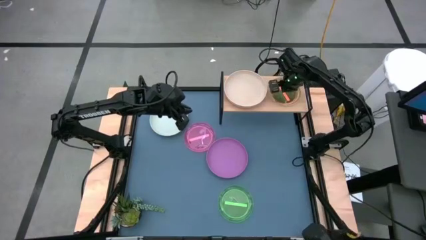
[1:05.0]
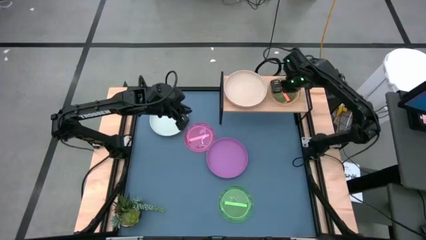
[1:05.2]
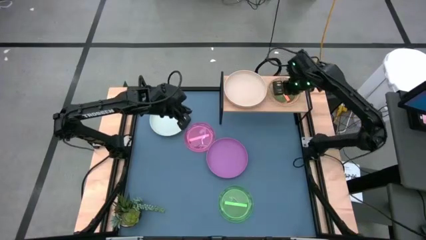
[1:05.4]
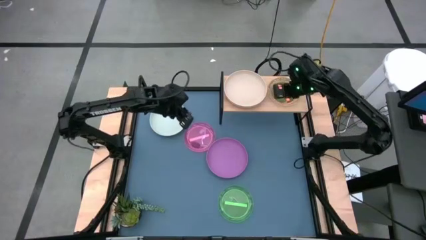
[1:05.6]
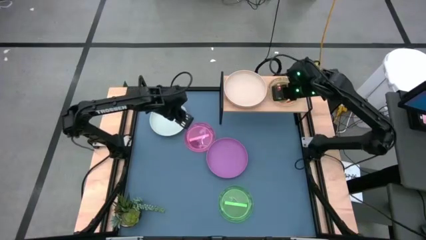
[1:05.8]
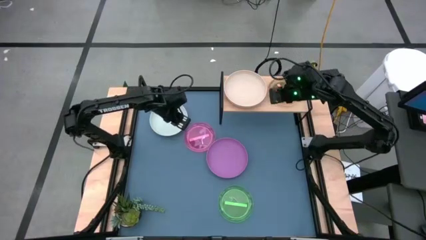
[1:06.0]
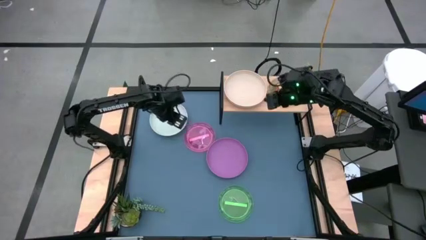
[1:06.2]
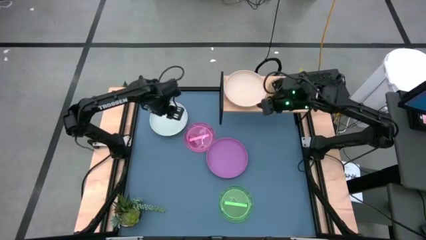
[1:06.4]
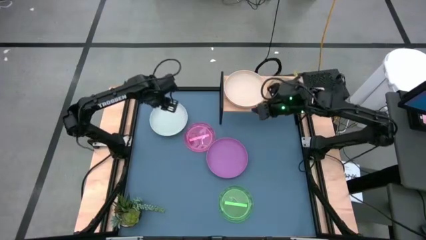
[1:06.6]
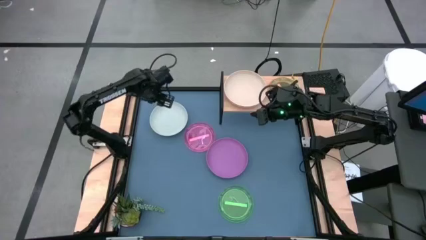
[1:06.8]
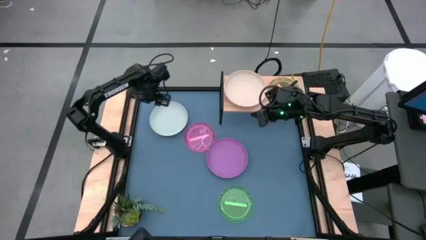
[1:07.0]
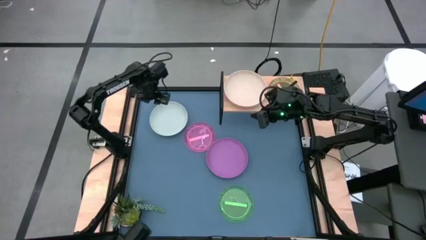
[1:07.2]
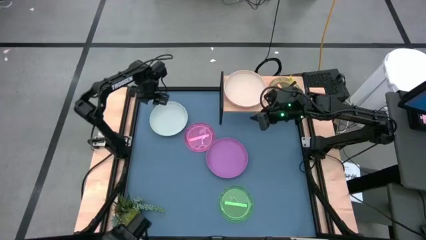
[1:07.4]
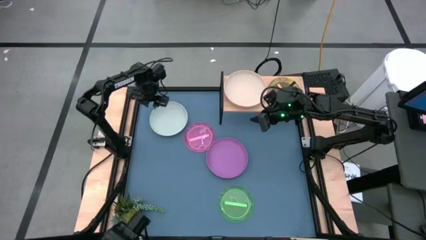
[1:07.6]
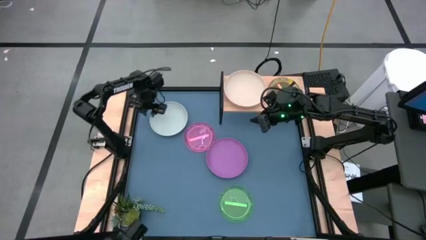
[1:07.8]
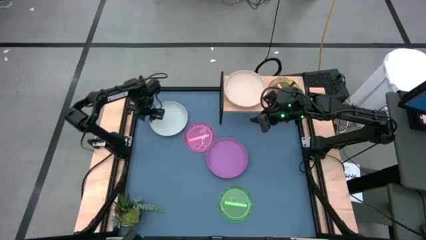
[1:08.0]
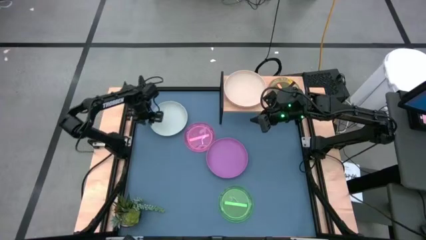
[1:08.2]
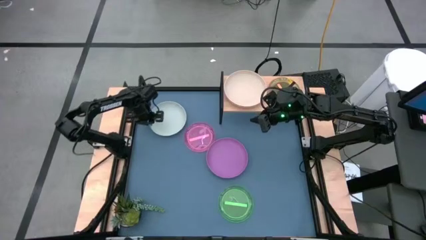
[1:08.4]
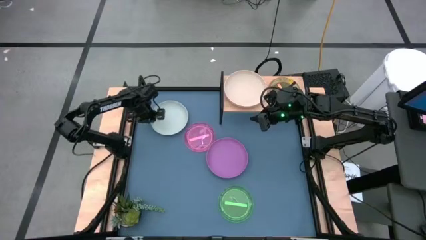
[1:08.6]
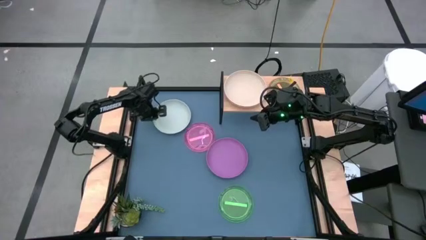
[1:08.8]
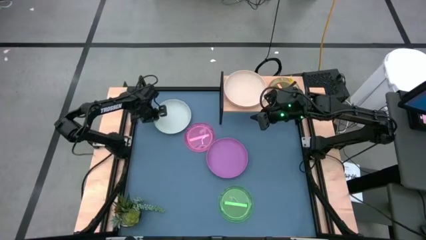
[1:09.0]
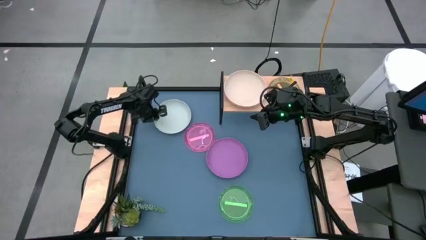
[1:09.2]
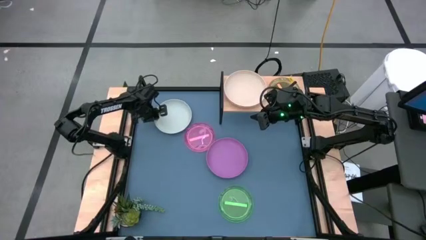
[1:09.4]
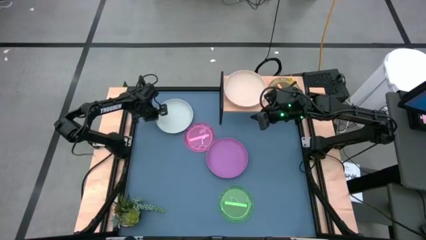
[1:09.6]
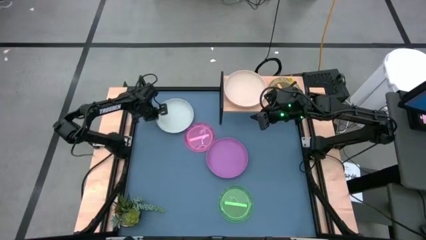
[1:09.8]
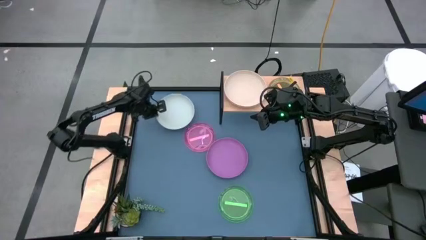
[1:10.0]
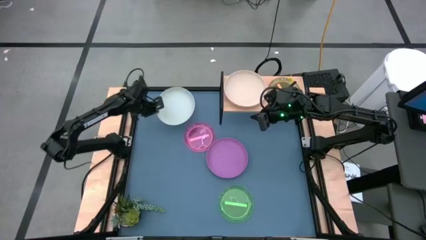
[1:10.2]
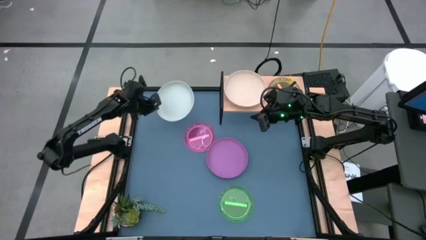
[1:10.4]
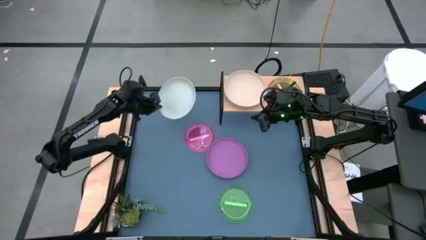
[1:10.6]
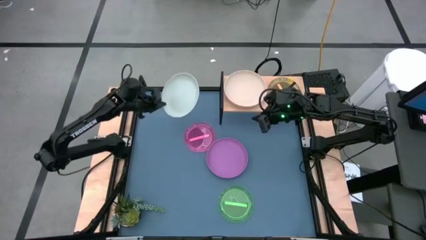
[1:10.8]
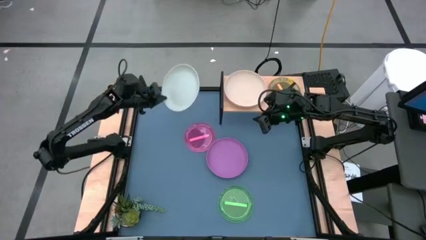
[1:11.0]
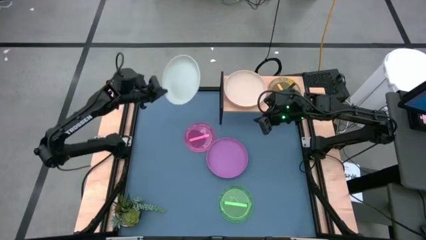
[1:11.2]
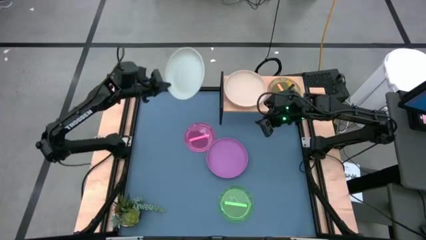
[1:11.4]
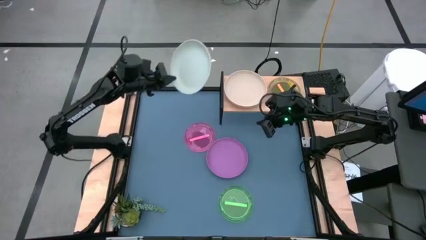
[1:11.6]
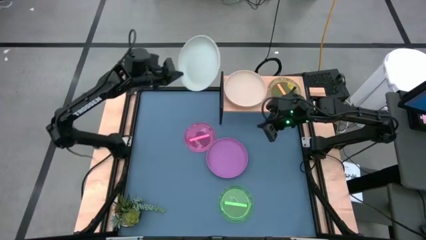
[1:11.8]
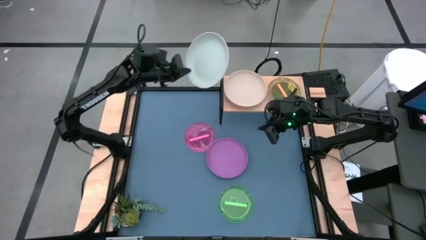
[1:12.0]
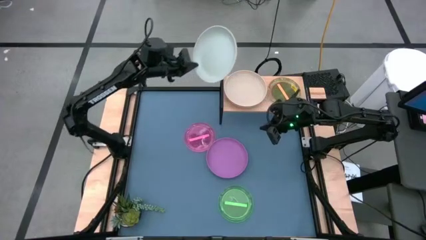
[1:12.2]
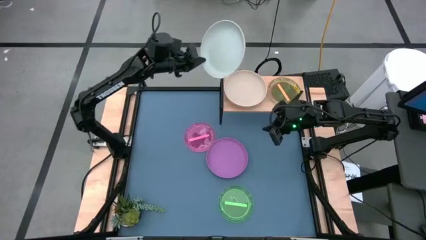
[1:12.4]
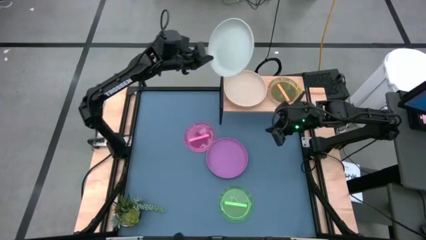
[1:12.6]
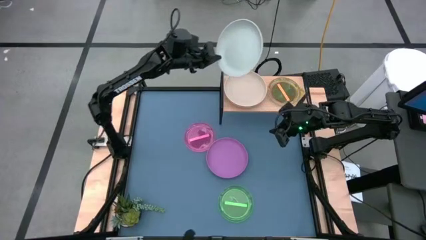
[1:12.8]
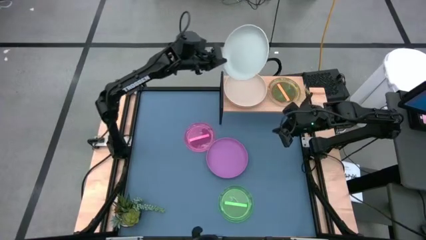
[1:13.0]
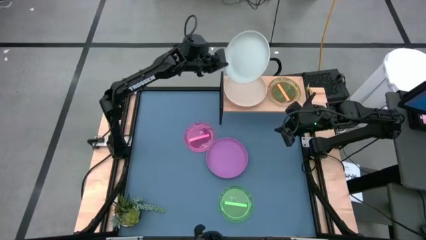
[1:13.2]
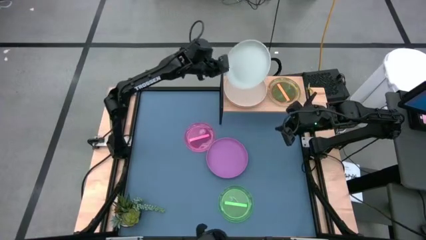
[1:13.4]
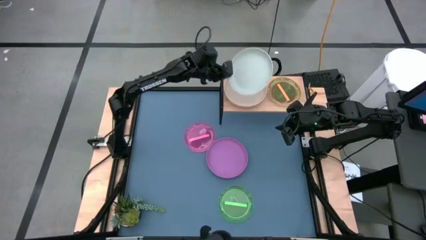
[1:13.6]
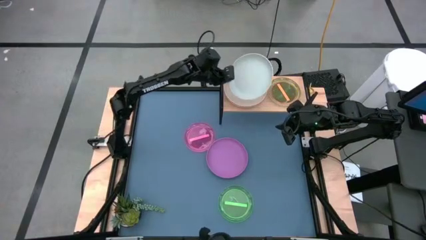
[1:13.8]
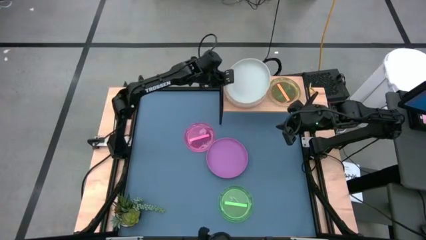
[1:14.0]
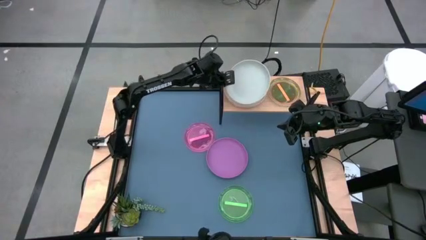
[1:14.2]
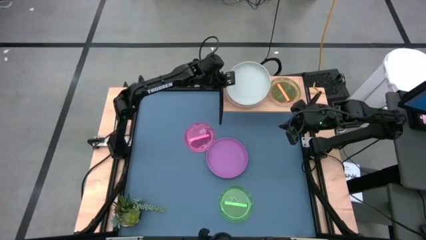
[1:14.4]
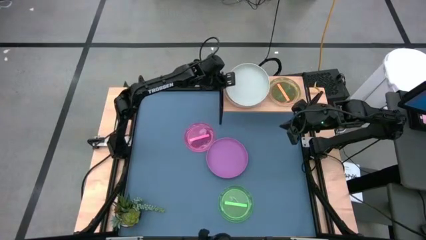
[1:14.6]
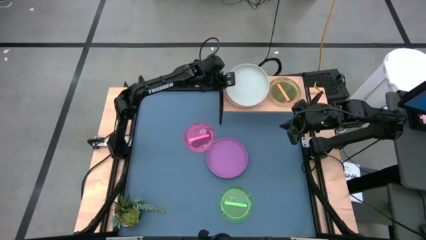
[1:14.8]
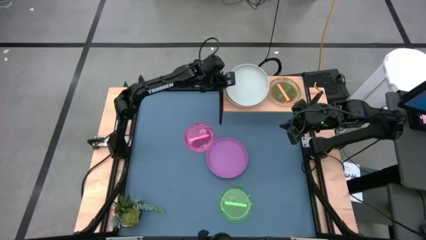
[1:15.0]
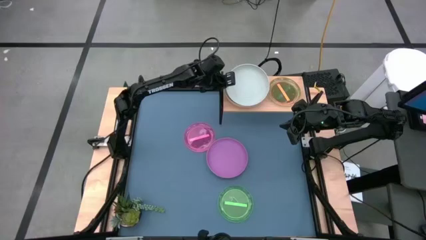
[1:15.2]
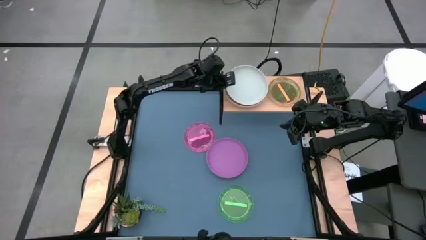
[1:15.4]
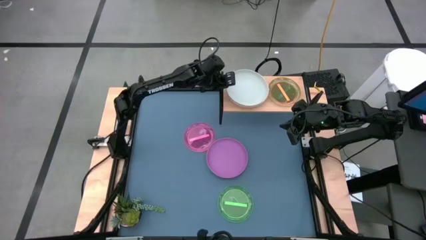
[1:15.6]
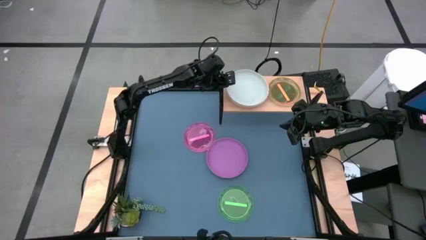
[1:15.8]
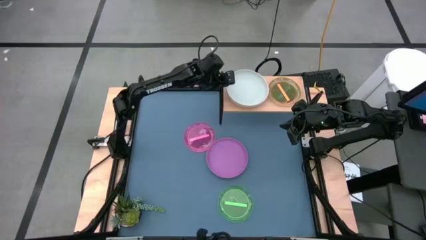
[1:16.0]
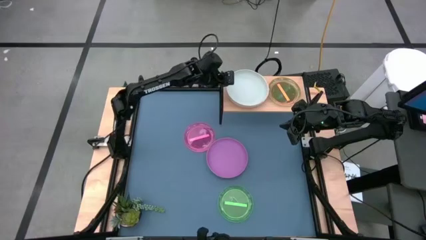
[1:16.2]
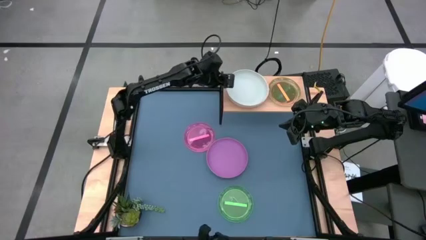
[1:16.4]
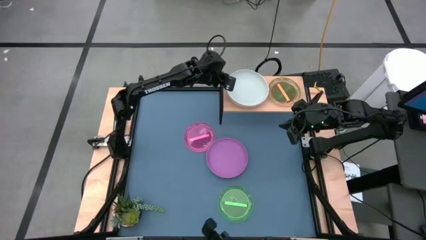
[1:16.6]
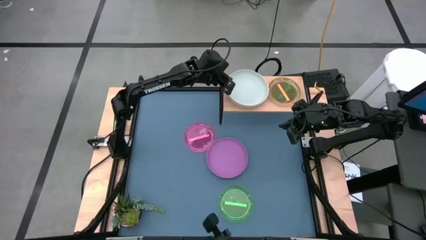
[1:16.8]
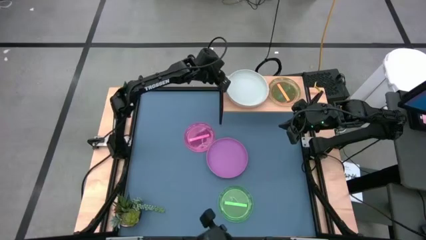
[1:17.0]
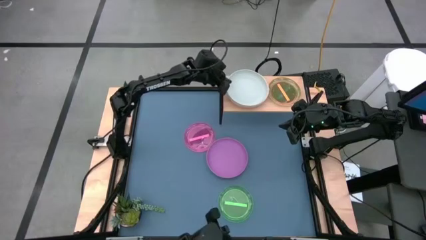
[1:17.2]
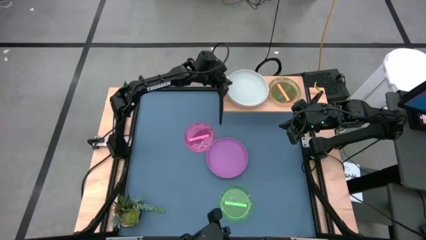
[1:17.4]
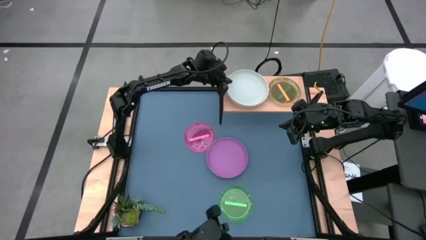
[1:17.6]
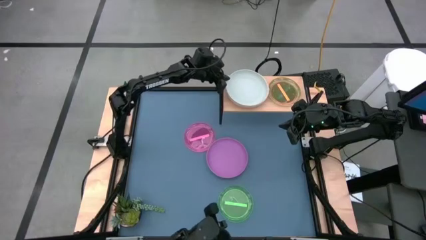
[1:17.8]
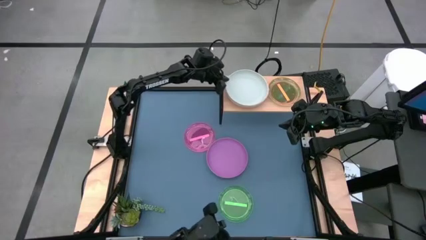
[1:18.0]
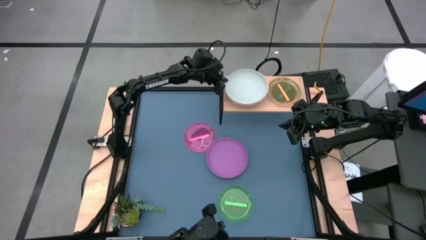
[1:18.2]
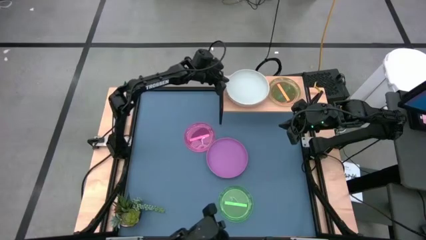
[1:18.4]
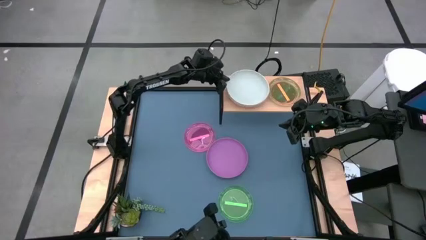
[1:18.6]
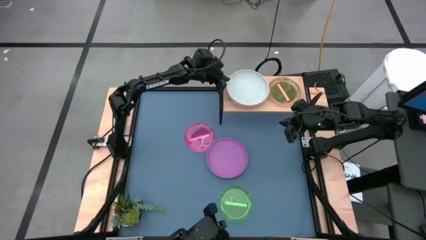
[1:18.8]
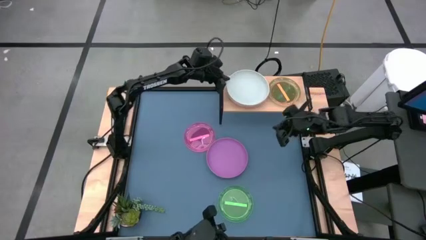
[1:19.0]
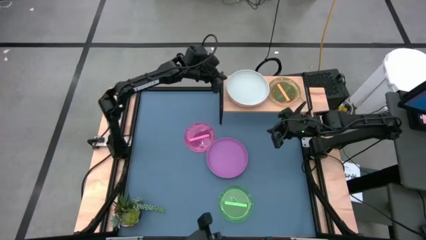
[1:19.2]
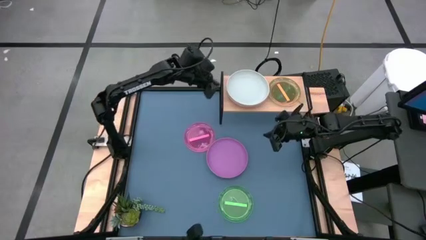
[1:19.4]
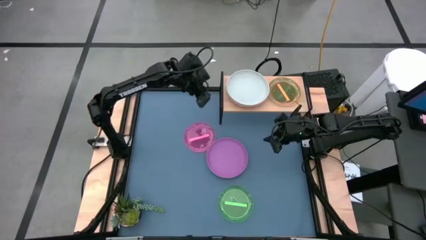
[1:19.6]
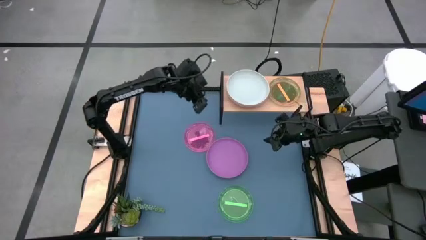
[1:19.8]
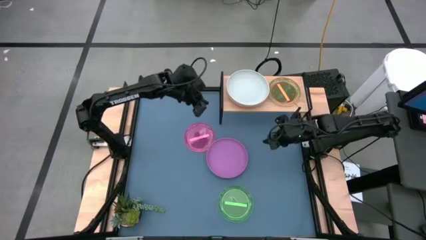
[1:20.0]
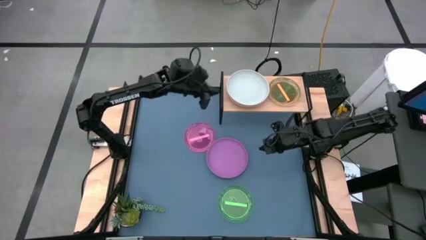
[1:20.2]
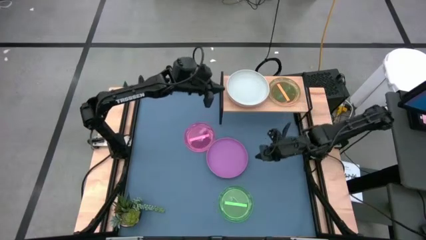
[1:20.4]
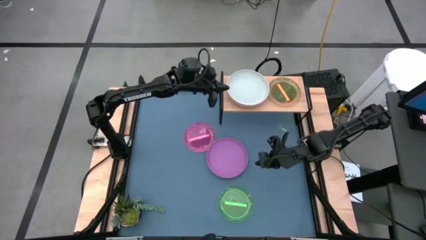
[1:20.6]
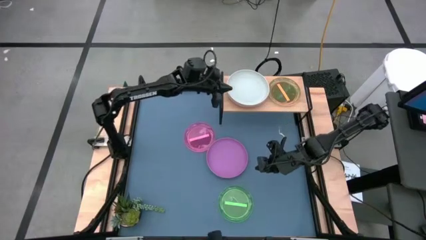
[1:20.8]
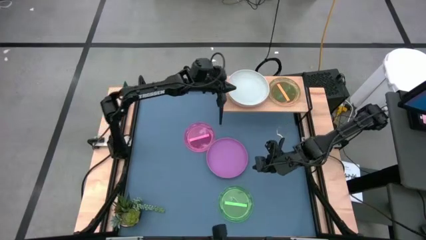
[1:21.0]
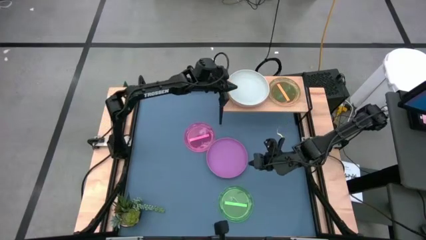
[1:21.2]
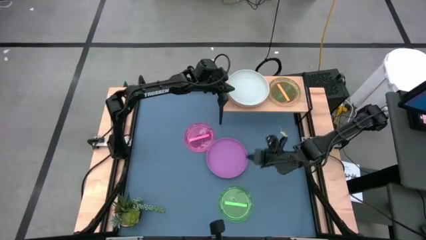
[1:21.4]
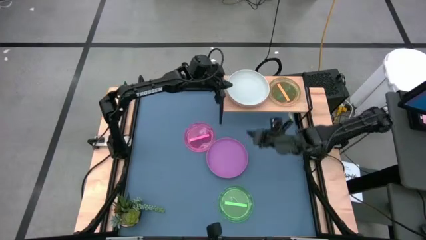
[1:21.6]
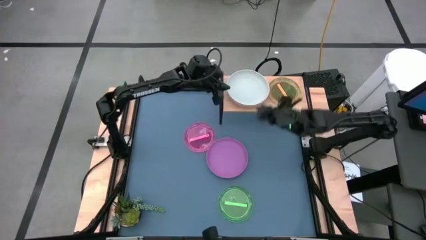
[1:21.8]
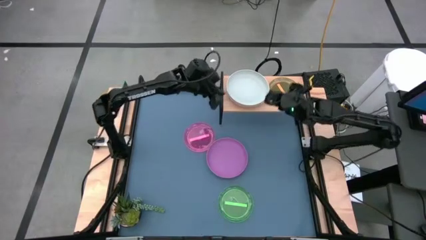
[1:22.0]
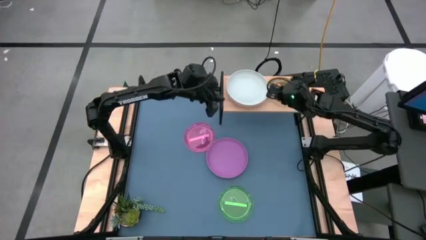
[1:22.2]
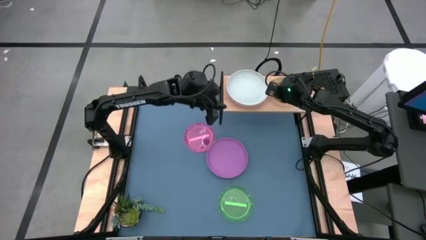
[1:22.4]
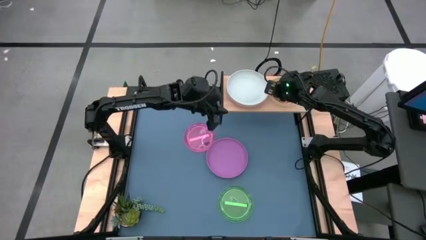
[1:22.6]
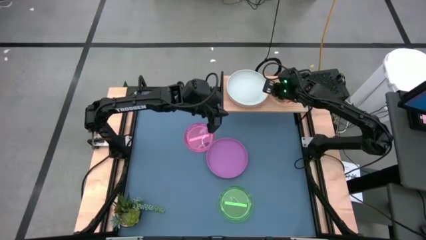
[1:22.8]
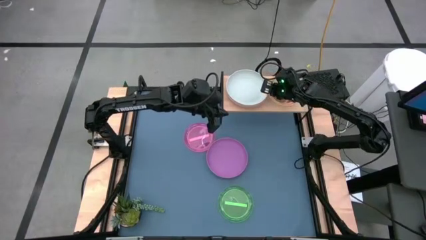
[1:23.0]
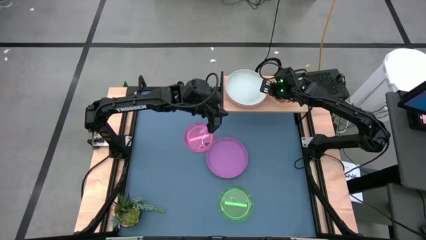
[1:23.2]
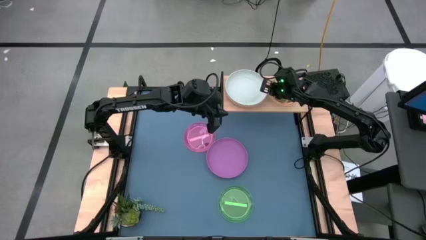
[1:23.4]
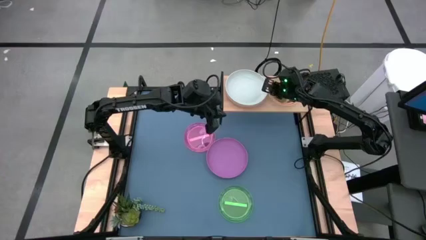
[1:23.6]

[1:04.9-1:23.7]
Task: Place and stack plates onto a shelf
Stack the large white plate on top of the large light brown plate on the shelf
